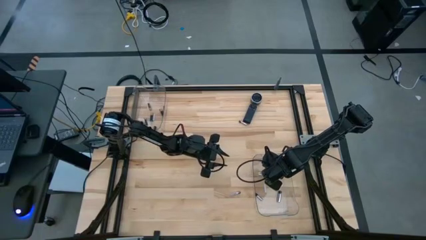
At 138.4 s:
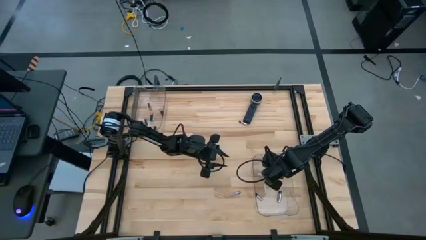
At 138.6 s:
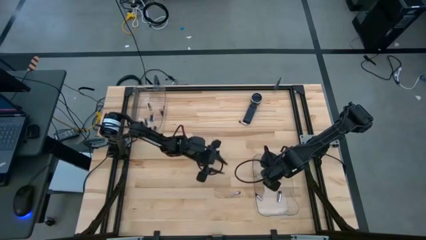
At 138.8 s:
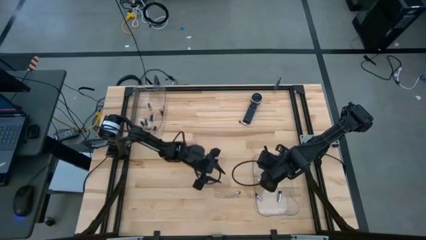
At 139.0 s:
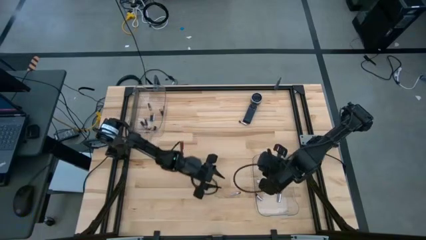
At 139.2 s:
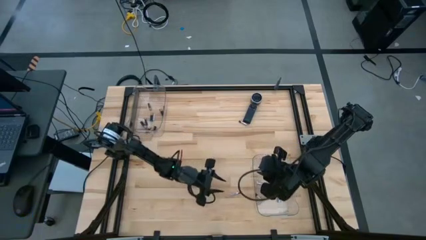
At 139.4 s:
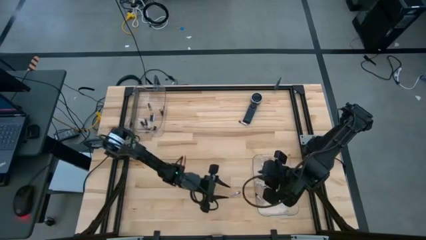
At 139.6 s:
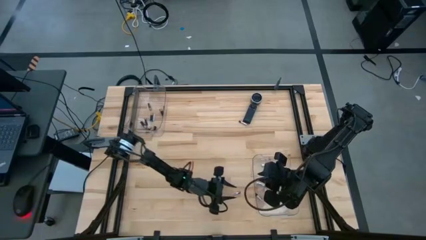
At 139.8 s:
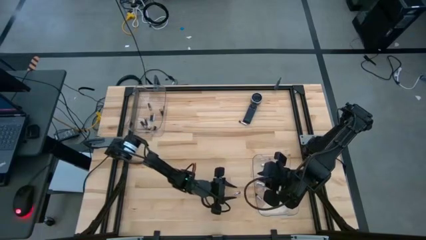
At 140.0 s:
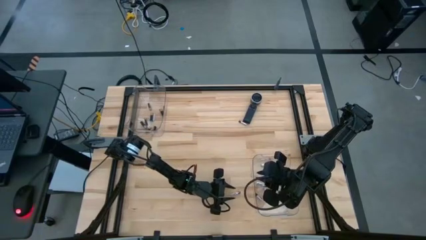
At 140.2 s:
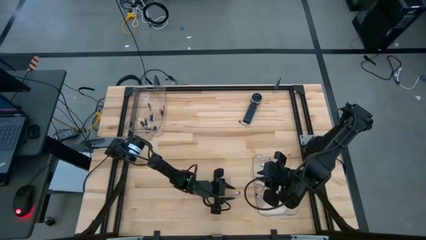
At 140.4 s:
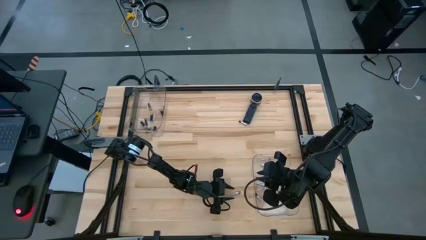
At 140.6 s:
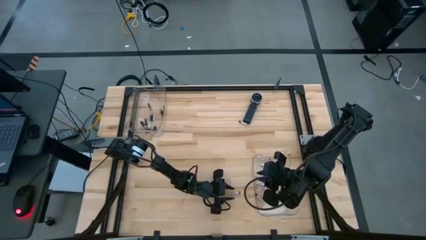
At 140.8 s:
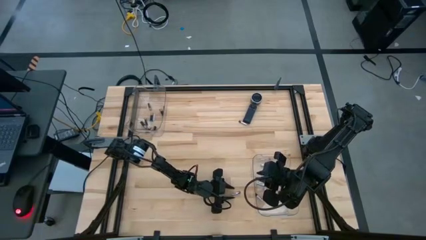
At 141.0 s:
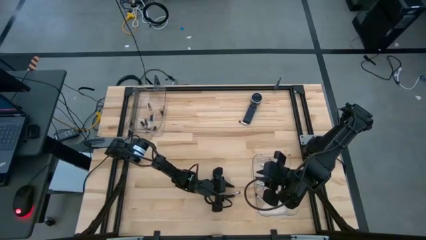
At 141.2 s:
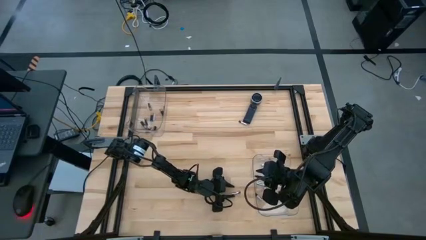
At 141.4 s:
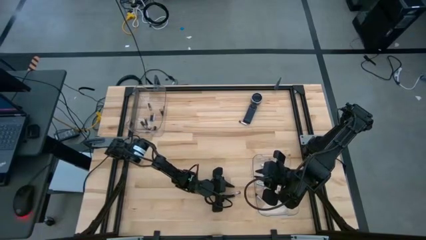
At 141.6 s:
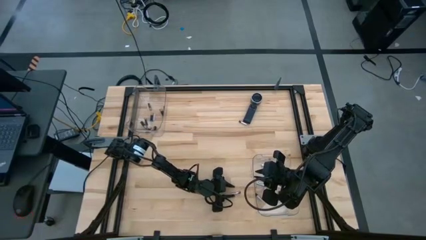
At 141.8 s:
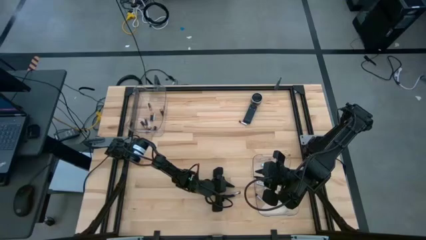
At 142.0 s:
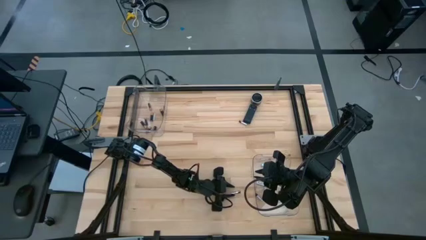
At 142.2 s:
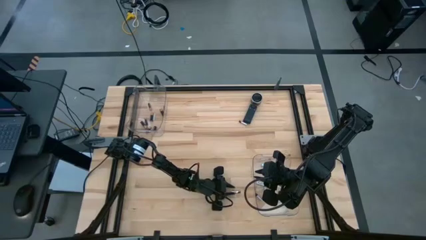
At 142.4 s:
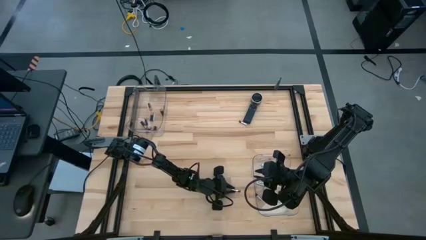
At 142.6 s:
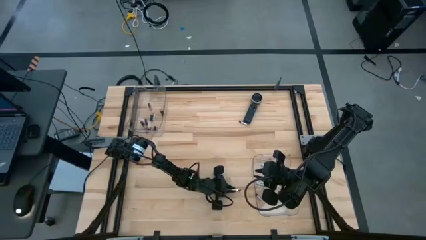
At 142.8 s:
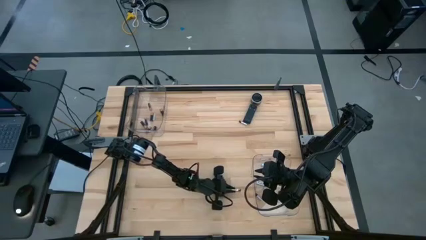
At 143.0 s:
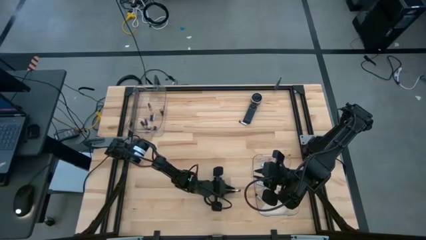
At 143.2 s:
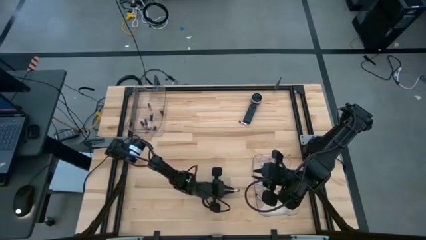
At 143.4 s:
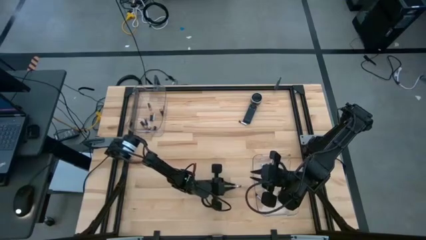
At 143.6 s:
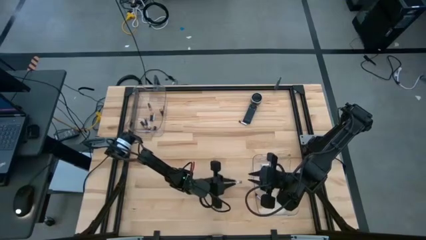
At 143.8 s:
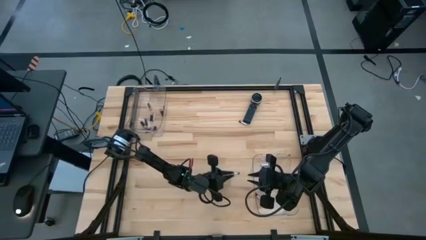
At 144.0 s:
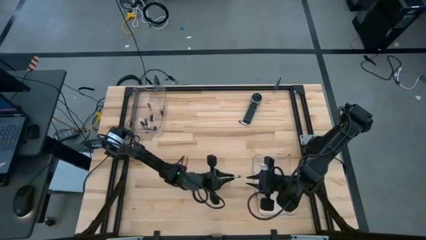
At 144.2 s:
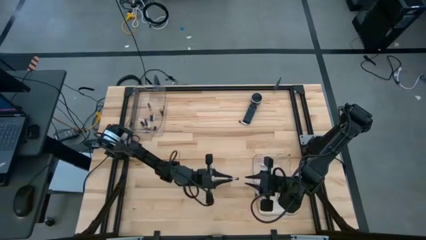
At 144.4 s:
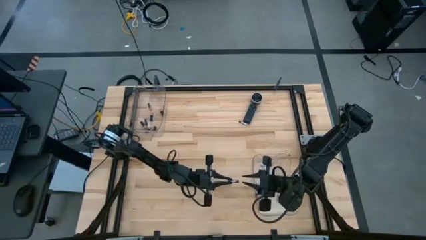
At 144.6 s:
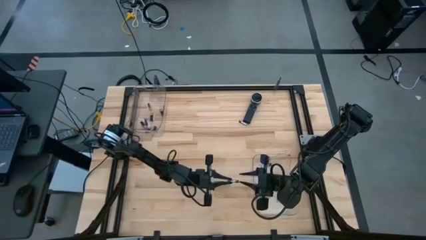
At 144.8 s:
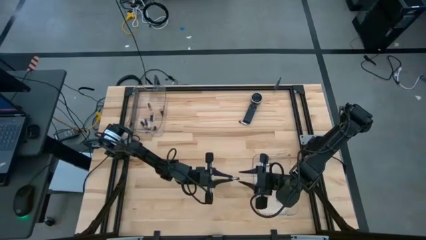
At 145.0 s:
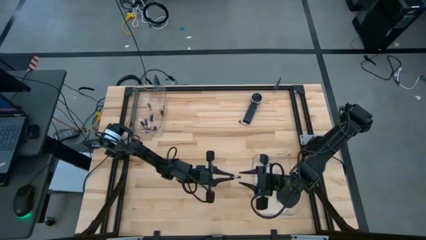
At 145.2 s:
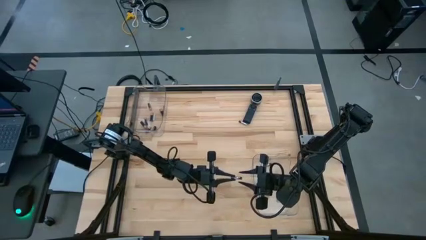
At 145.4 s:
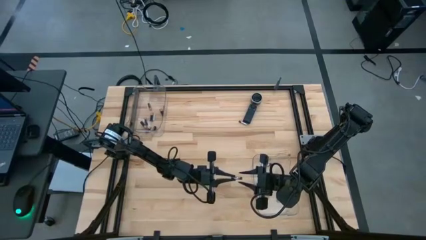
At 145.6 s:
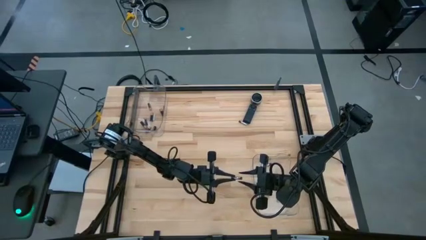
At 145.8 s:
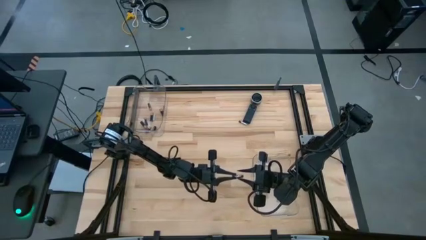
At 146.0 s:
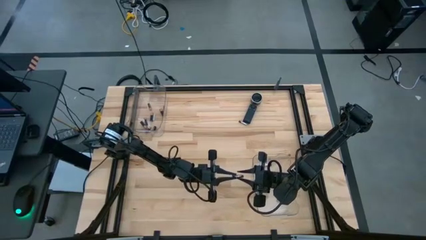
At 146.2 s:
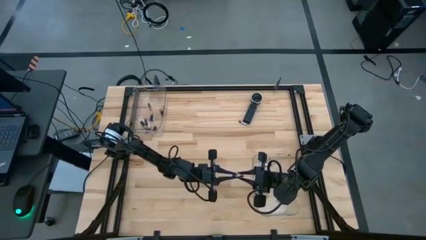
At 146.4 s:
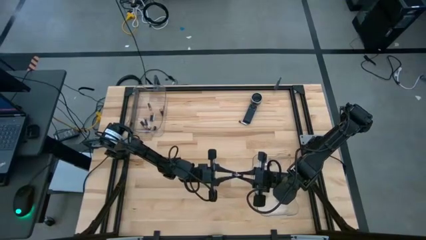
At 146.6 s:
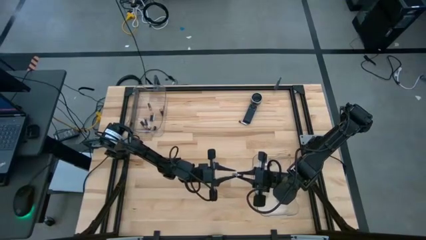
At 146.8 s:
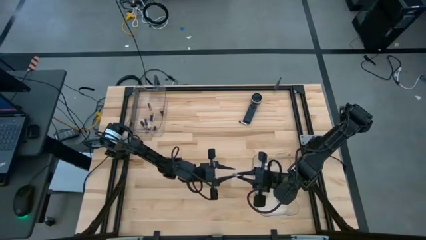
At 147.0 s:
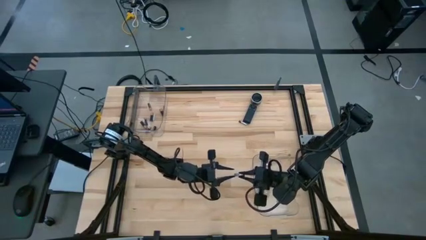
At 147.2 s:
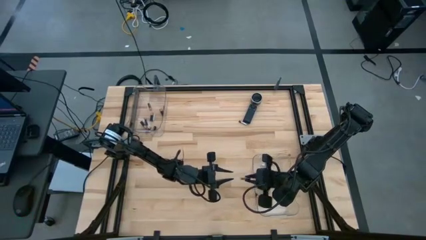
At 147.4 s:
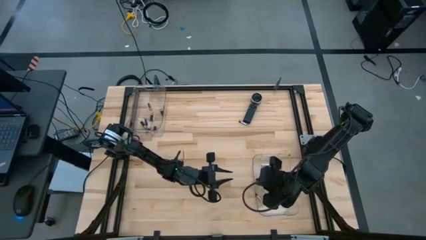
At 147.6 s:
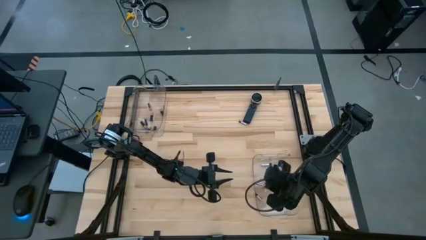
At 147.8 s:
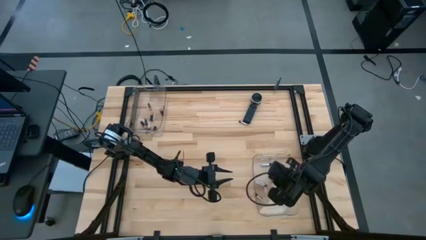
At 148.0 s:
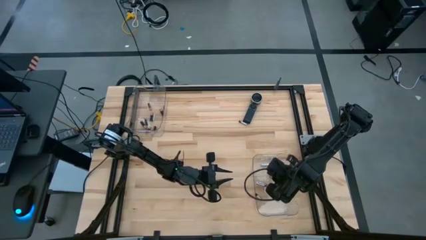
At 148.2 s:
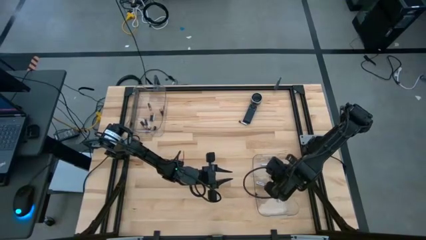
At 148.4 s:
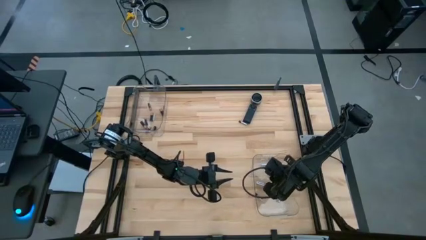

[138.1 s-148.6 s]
Task: Sort batteries
Put the silver battery into the bottom transparent bin

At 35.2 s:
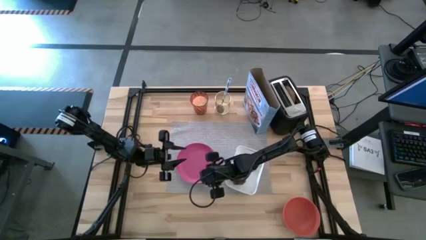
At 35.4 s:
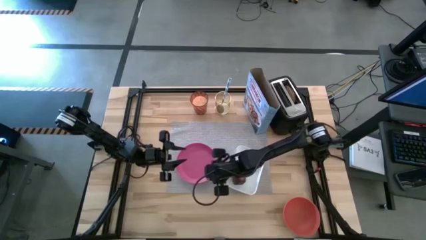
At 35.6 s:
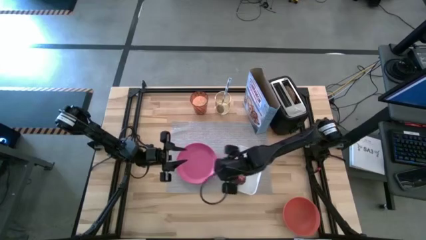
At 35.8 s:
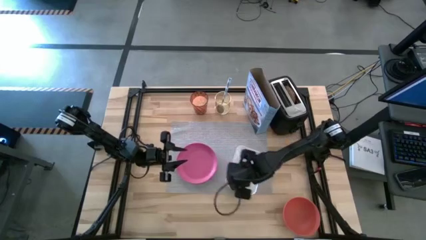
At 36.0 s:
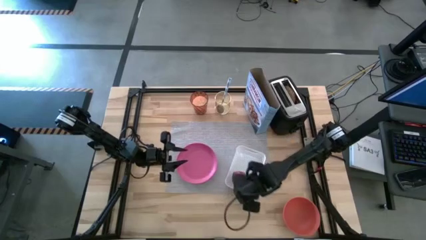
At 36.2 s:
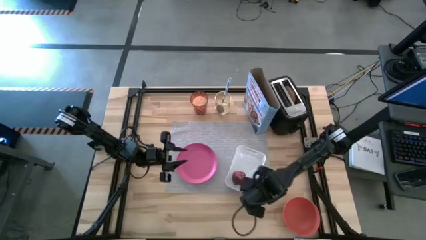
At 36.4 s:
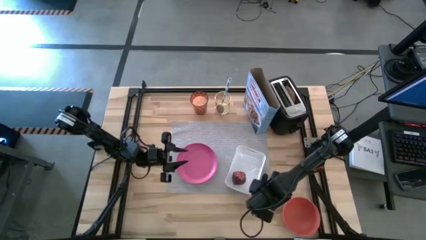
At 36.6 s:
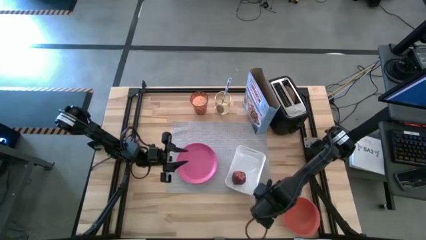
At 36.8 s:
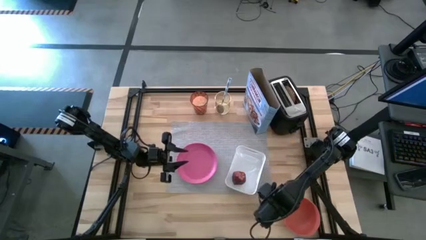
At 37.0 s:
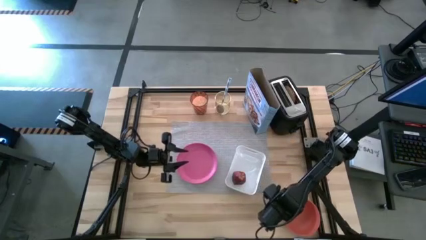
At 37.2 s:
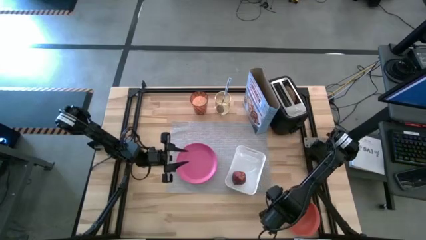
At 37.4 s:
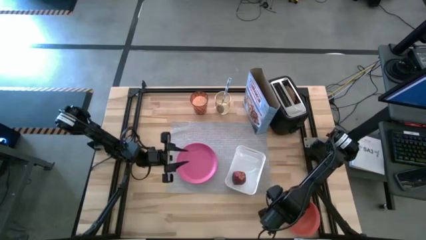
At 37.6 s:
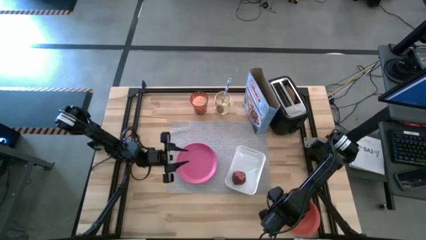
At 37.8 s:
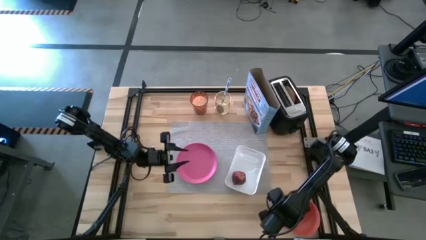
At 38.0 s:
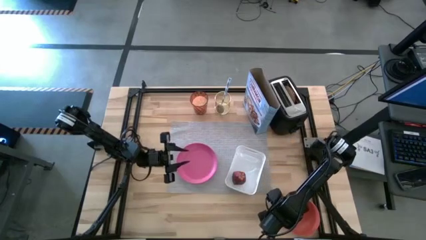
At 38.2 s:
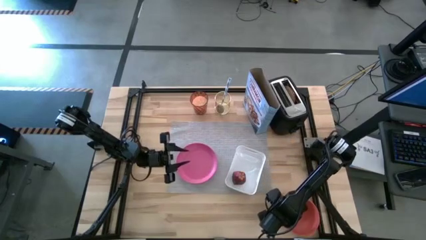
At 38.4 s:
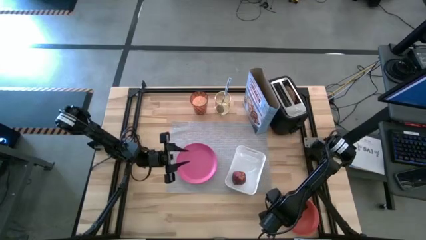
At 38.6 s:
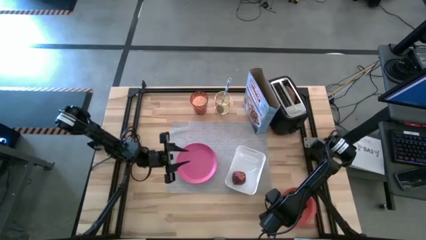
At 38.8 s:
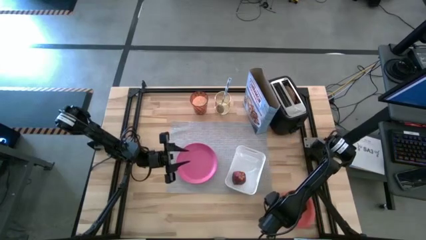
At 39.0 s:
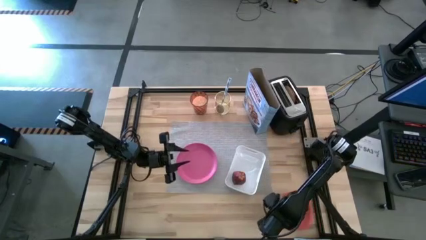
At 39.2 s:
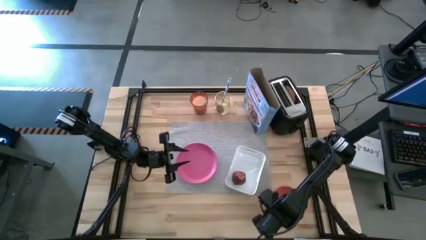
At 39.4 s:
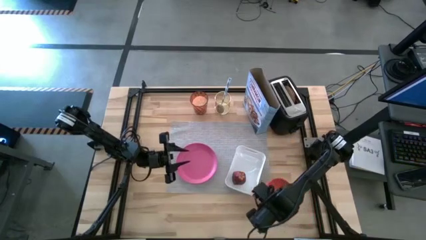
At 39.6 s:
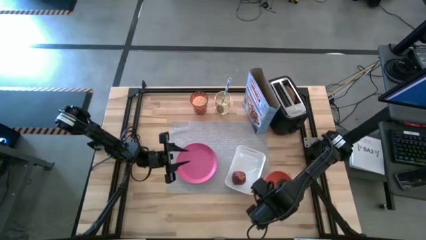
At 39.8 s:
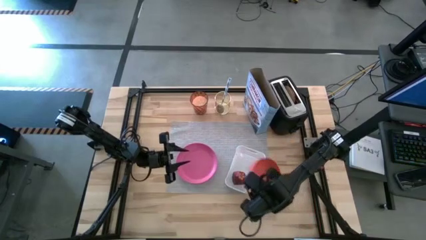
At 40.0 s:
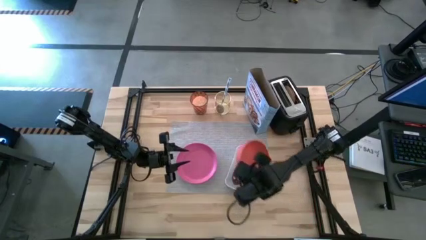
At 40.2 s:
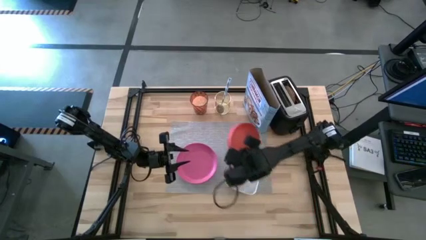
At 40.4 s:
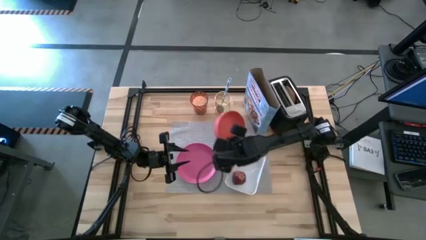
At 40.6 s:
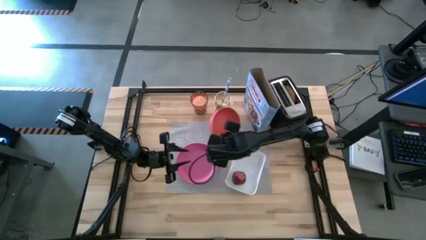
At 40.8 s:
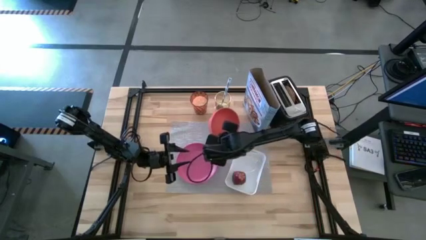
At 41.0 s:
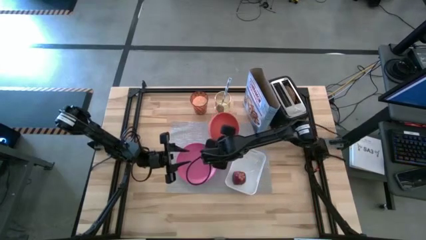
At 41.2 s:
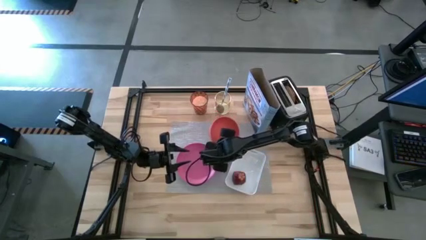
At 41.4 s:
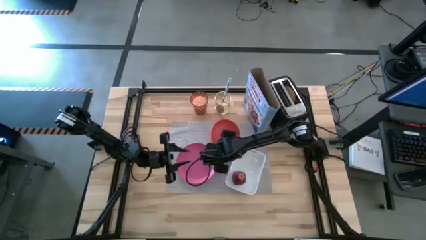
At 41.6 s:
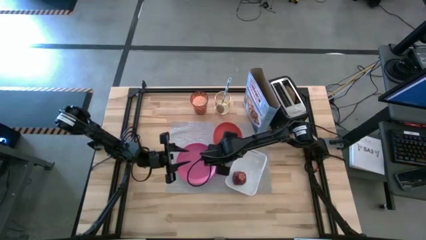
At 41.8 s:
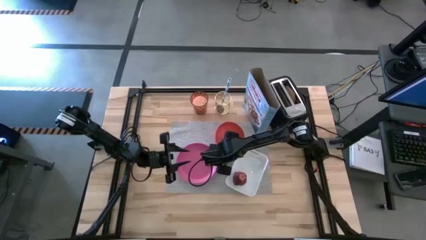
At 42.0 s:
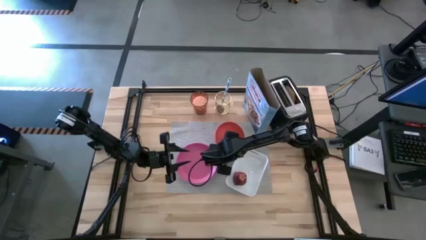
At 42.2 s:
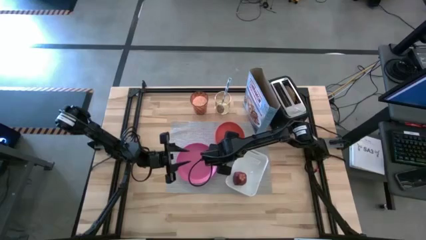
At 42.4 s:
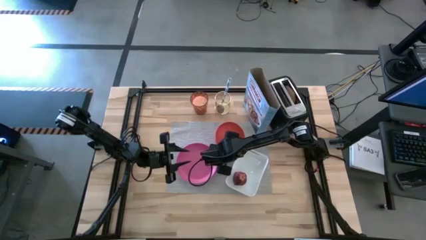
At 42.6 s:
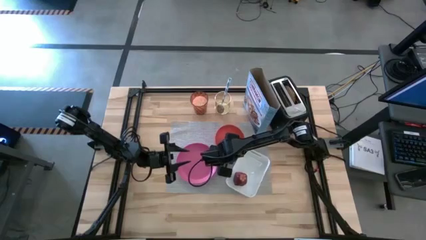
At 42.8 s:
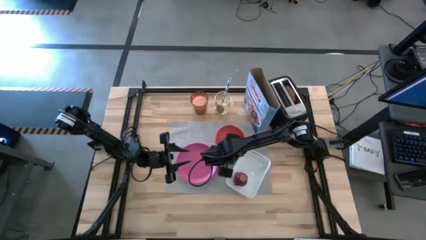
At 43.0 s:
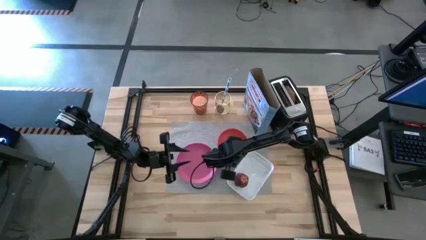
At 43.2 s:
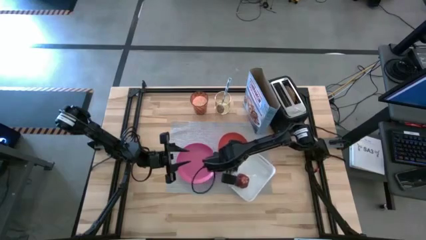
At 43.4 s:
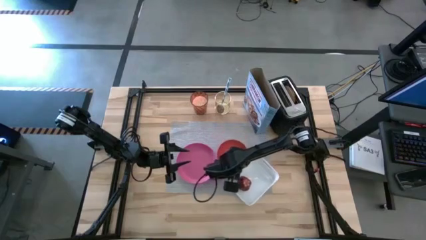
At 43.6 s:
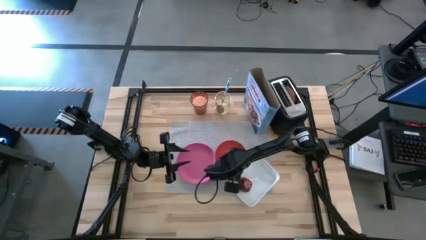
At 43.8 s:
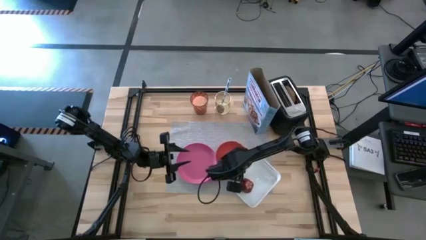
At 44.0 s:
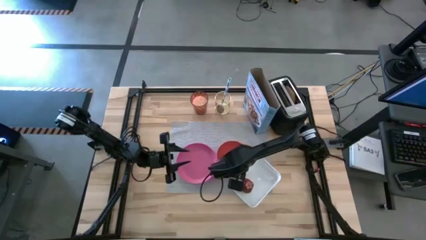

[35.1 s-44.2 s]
Task: Arrange a breakfast setting
Put the orange bowl on the gray table mat to the right of the pink plate
